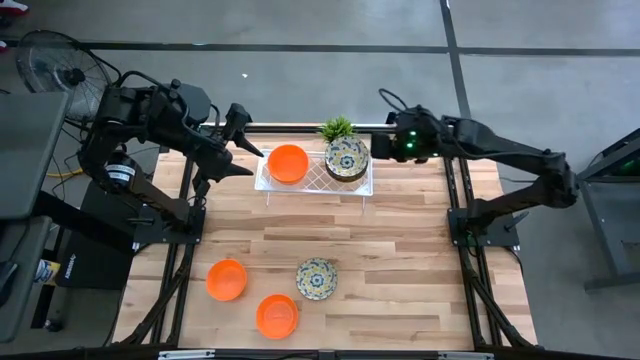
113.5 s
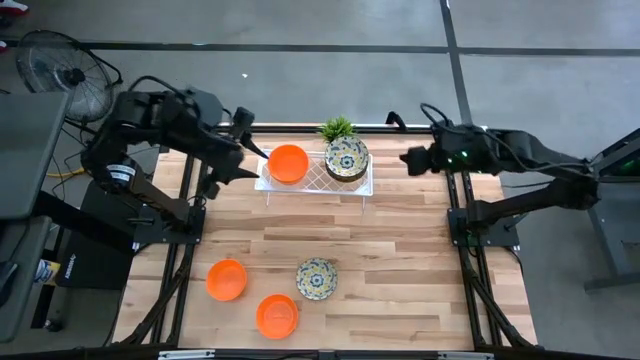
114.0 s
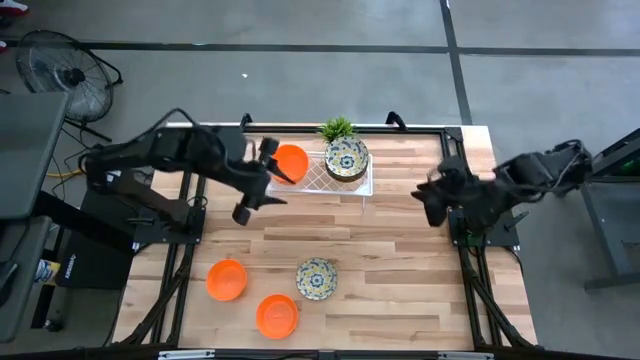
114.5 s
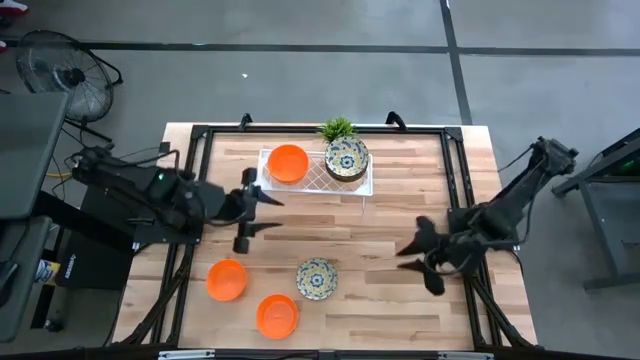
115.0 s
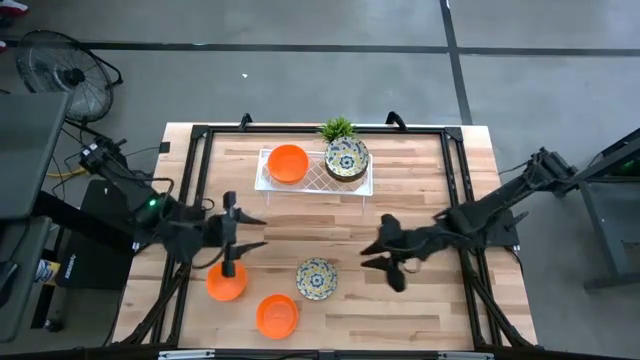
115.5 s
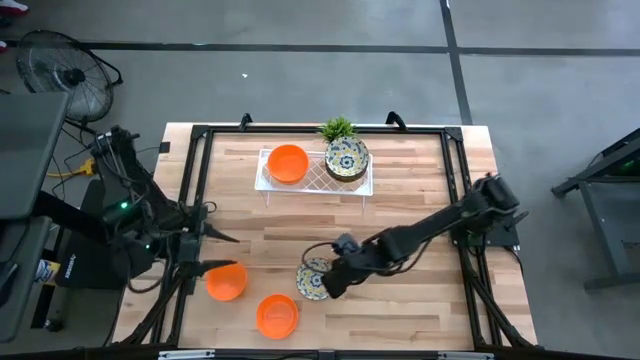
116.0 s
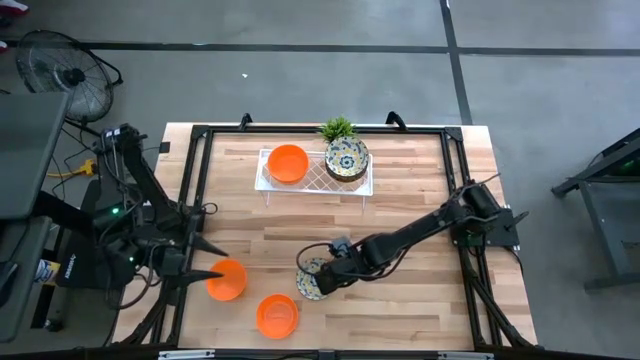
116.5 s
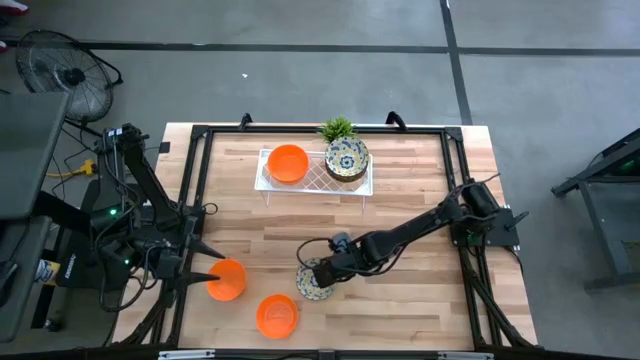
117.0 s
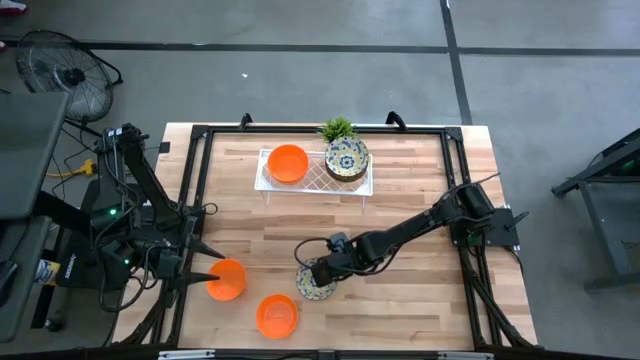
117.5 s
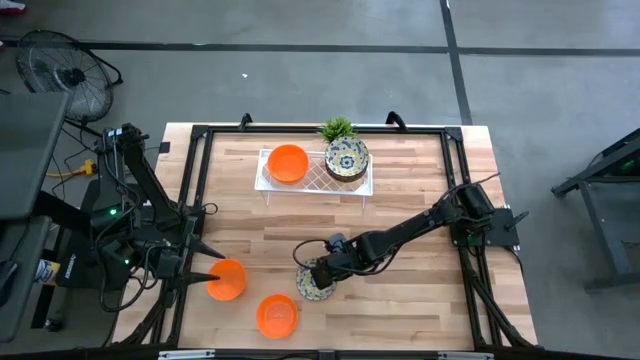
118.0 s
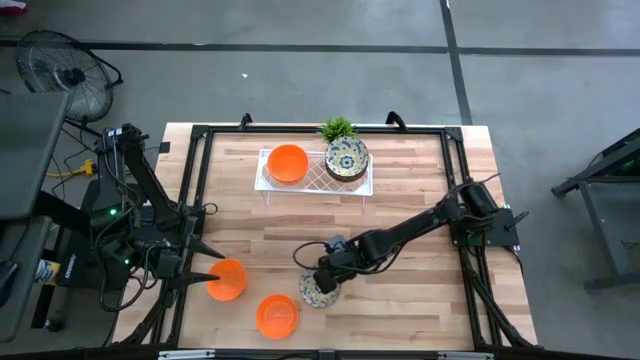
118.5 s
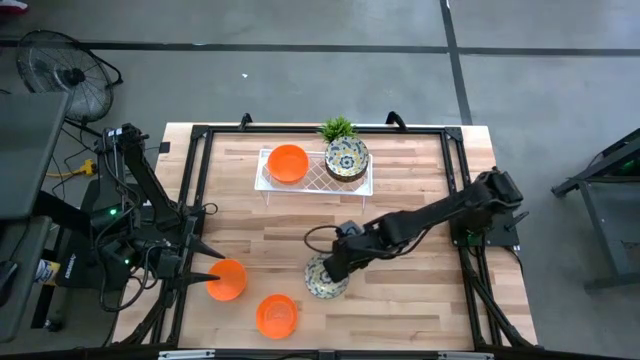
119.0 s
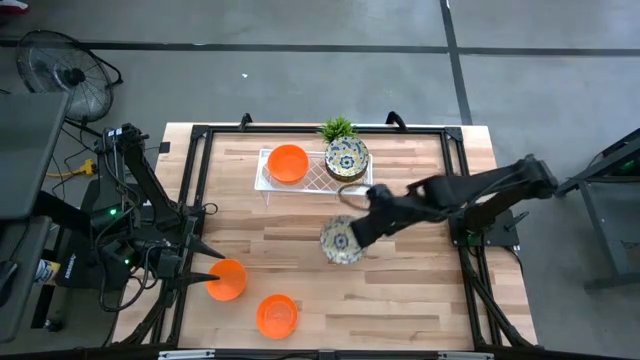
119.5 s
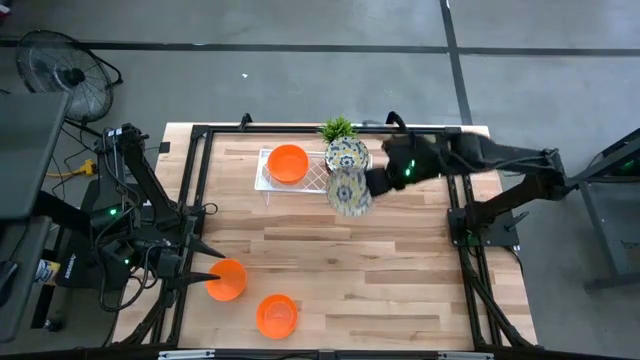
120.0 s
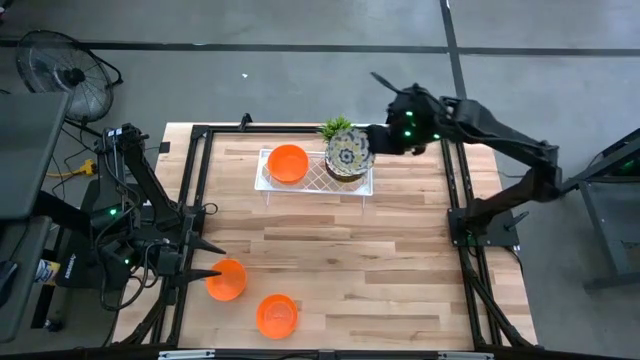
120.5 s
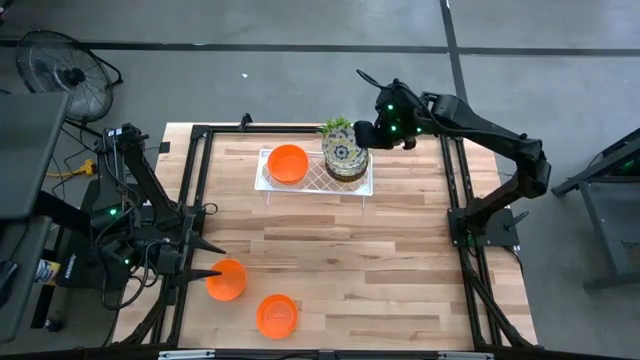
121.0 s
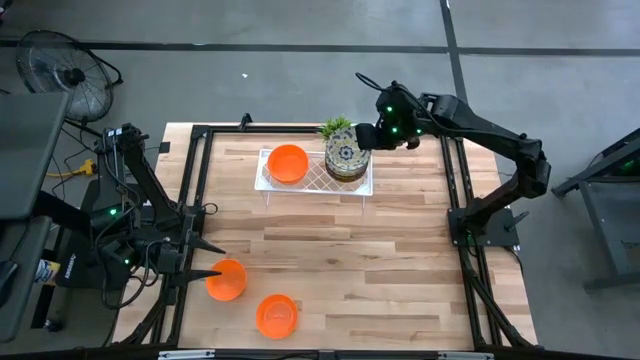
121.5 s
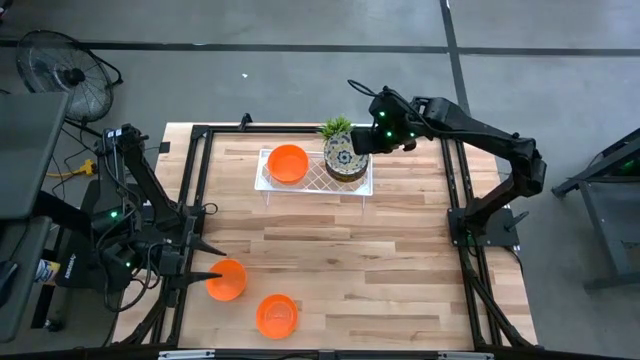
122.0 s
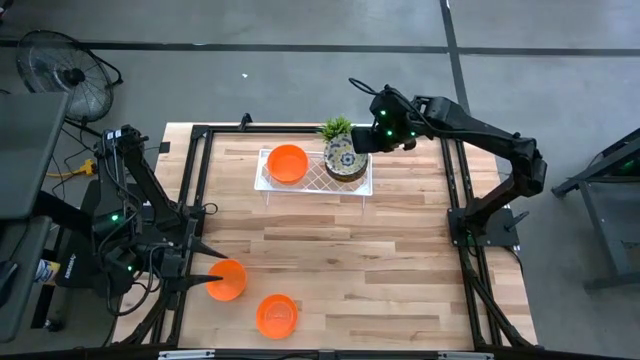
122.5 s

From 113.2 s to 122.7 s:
Task: Pick & Place Mini bowls
Stack the yellow bowl on the yellow bowl on the shelf

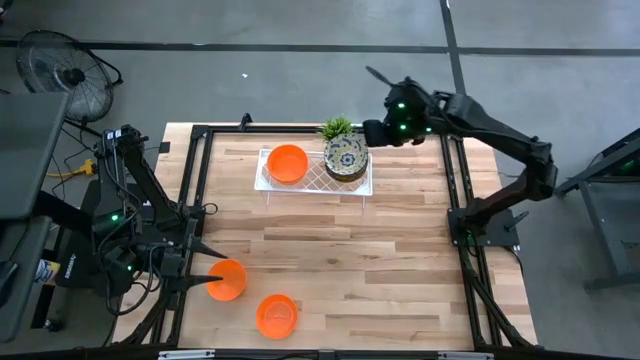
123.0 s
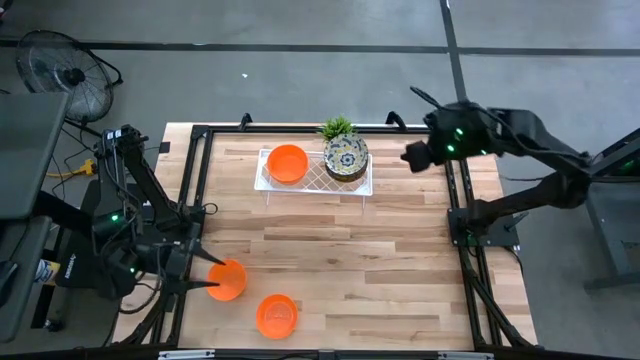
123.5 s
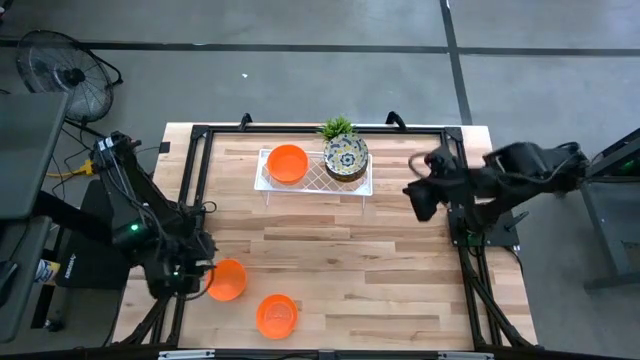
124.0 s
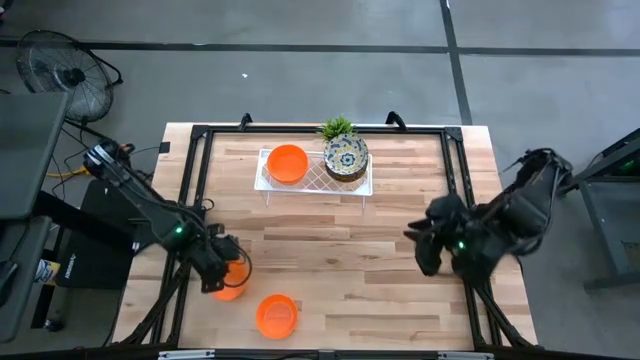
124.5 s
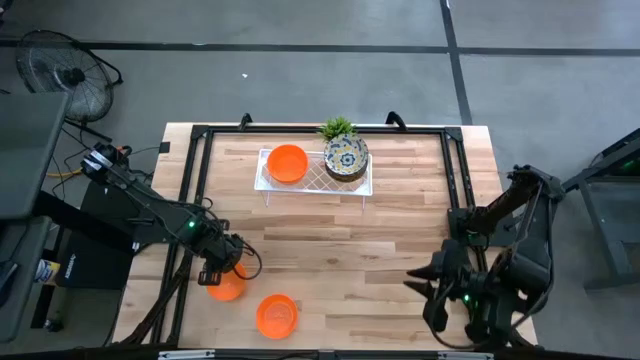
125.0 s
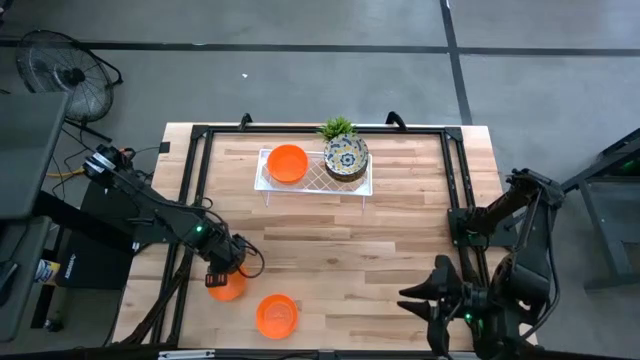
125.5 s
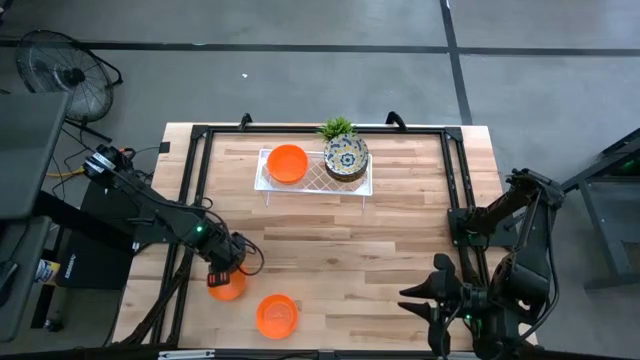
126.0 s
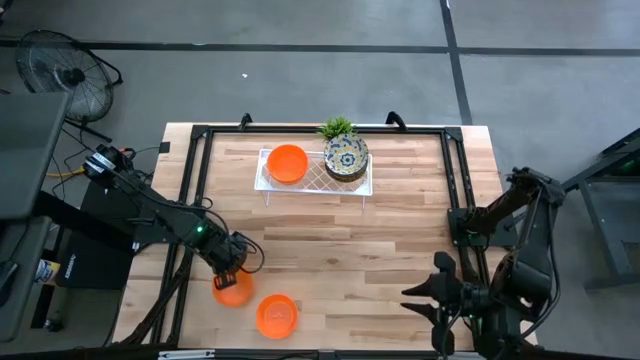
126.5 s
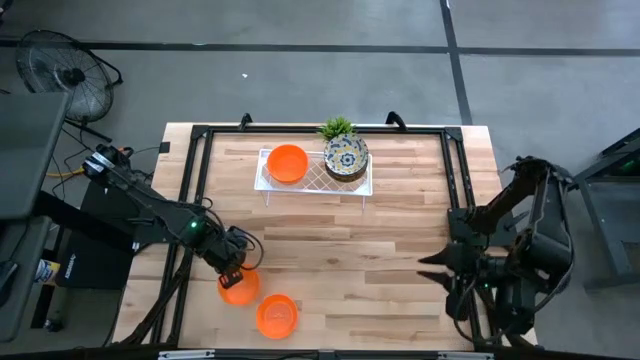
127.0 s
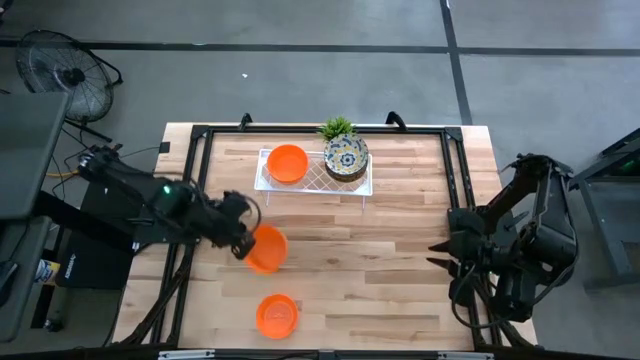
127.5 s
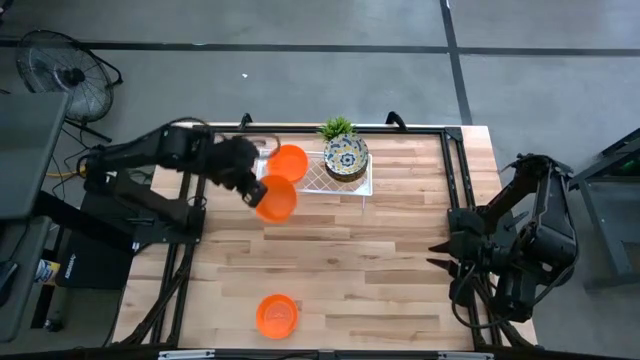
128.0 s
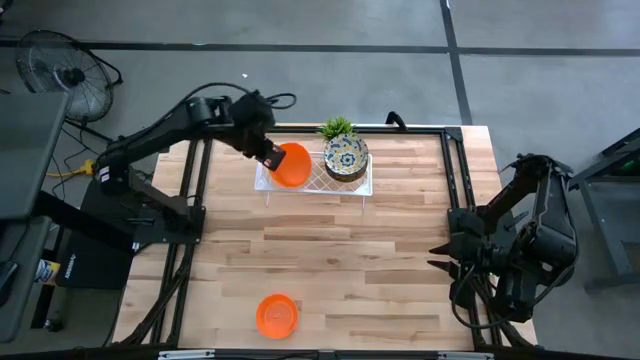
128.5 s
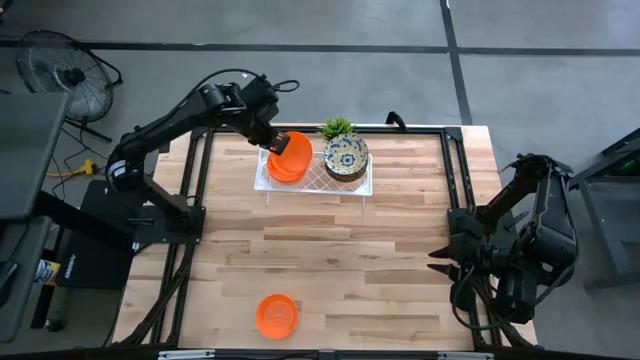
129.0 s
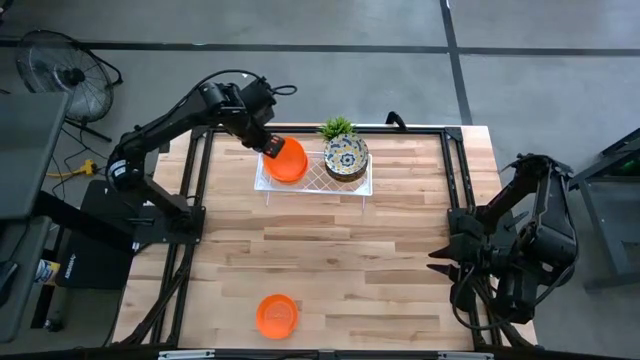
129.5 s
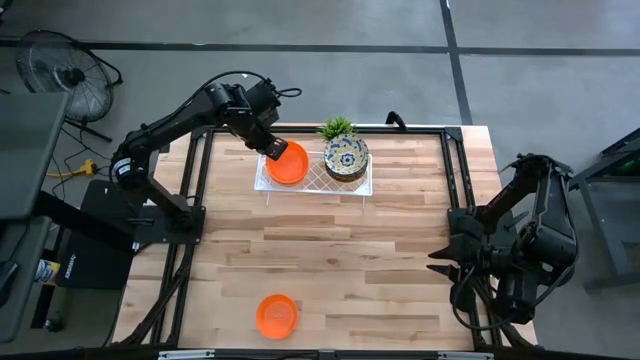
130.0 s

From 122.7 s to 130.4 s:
Stack the orange bowl on the orange bowl on the shelf

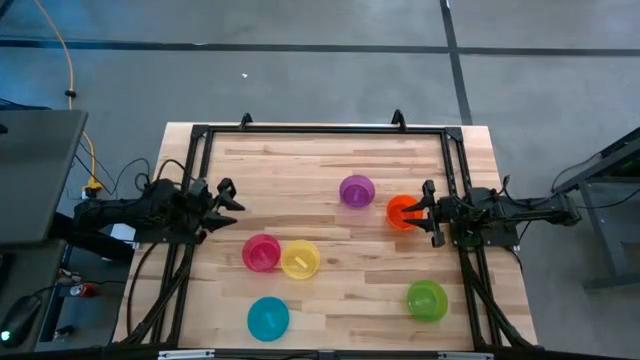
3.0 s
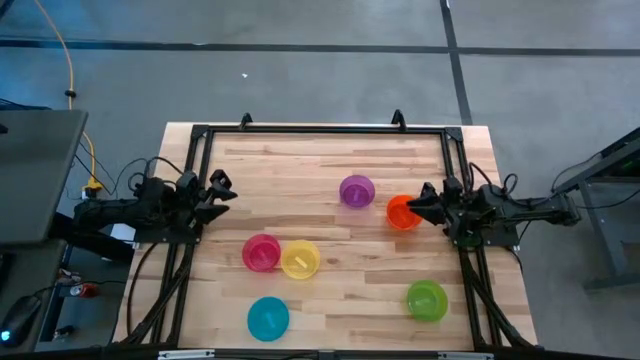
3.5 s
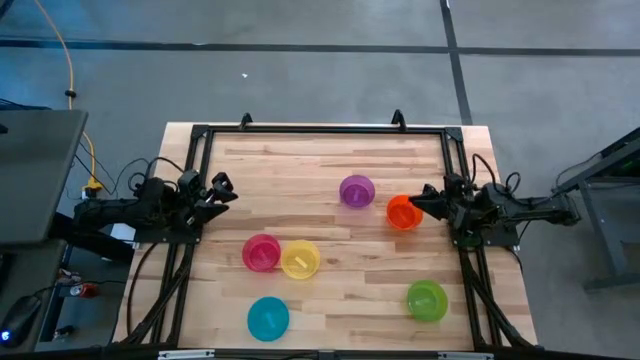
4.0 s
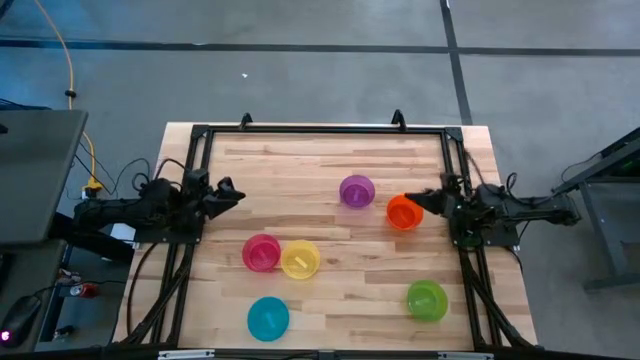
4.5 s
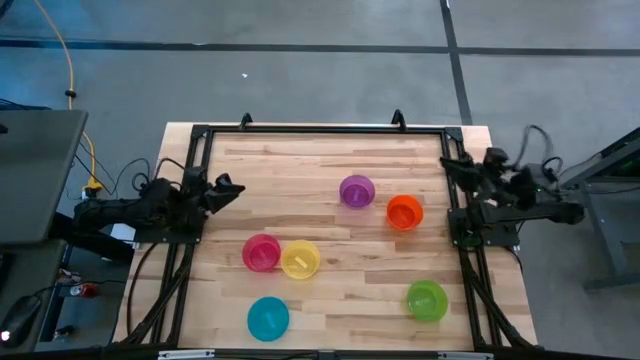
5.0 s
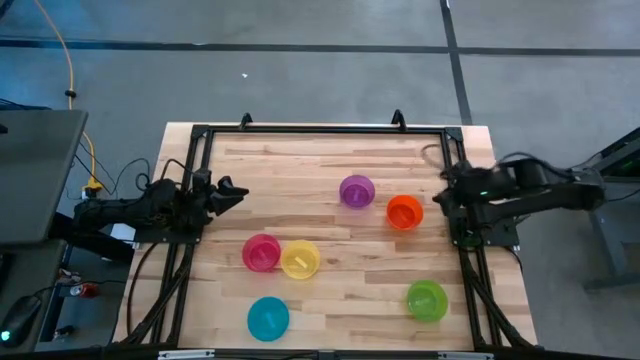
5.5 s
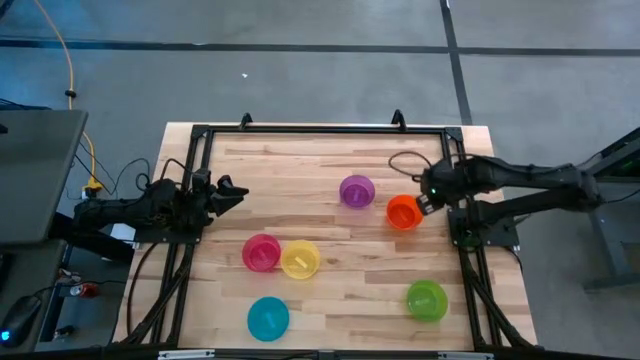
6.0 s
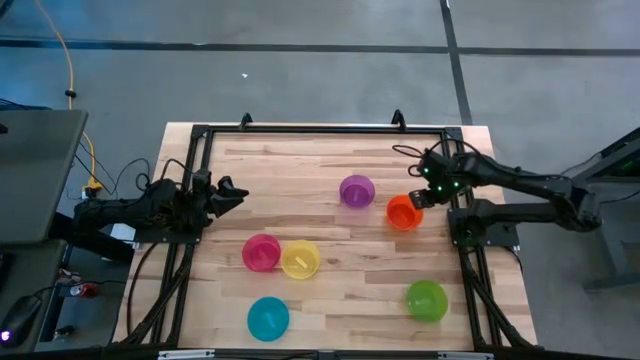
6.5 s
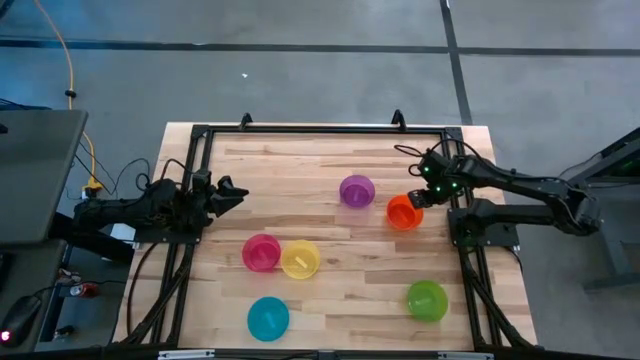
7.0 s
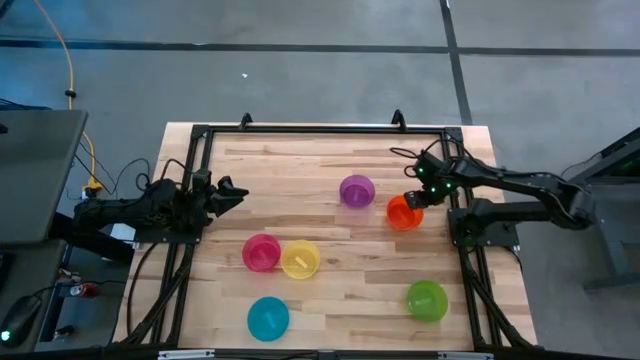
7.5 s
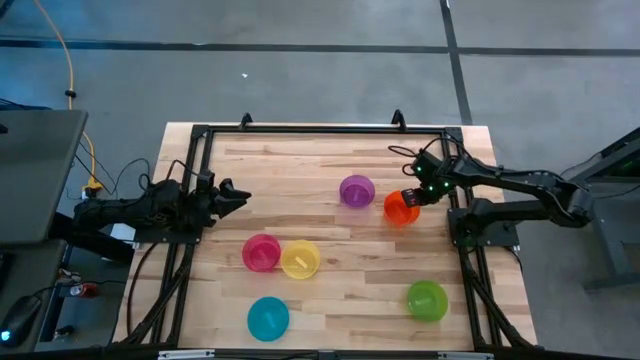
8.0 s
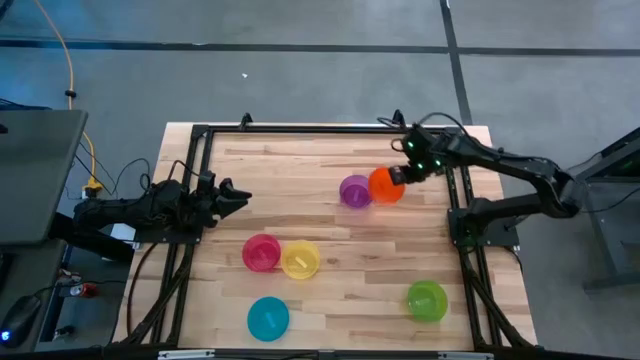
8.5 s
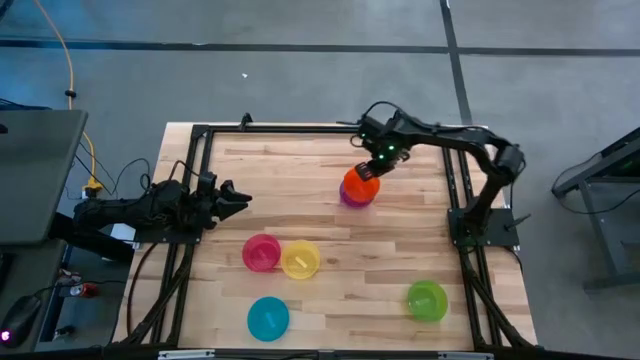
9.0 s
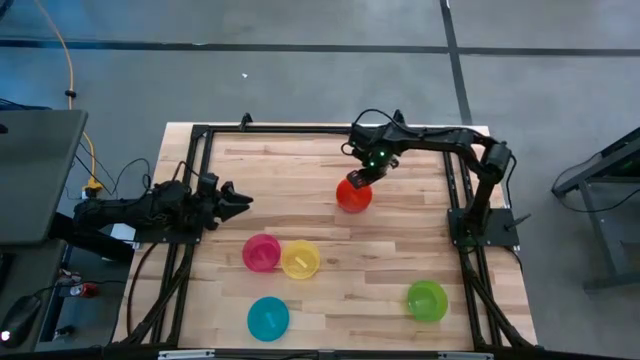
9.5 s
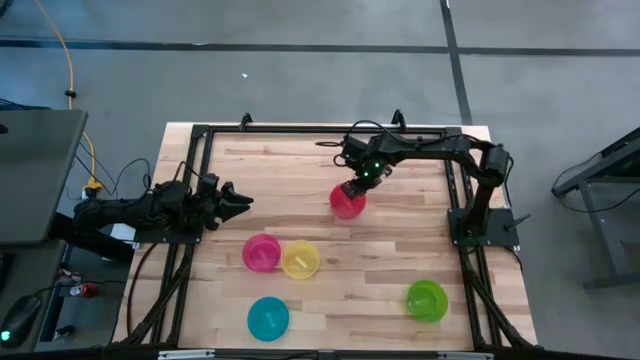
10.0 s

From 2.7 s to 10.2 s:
Task: Nest bowls inside each other
Stack the orange bowl on the purple bowl
